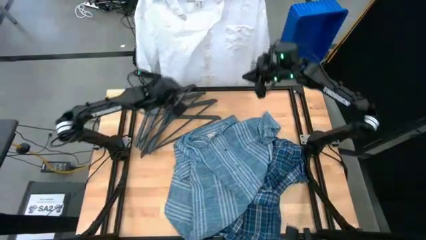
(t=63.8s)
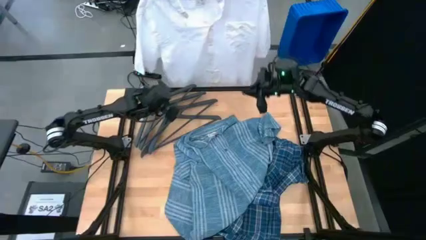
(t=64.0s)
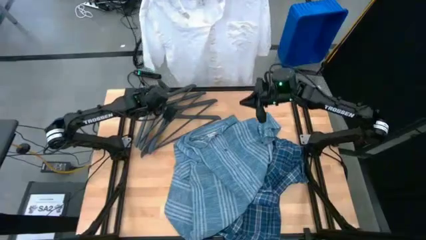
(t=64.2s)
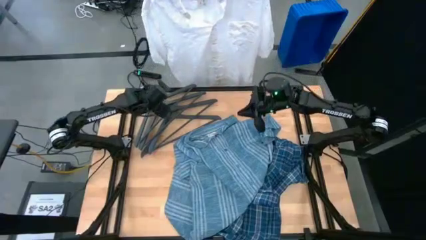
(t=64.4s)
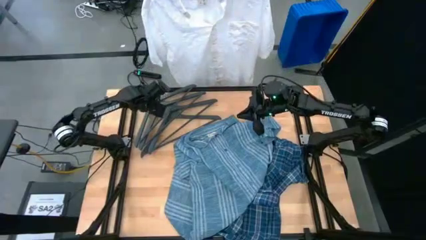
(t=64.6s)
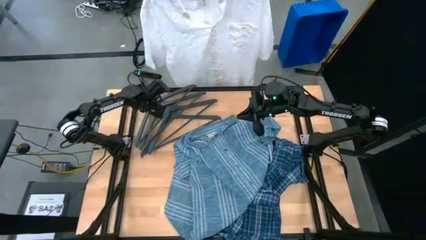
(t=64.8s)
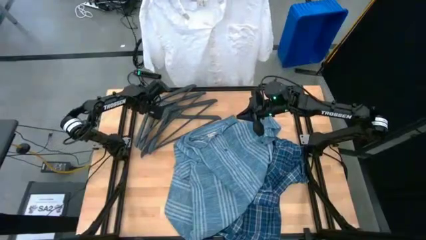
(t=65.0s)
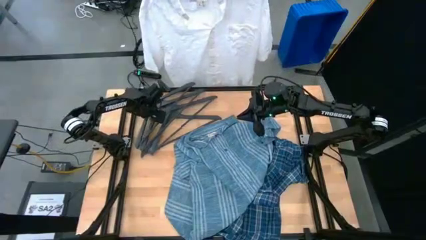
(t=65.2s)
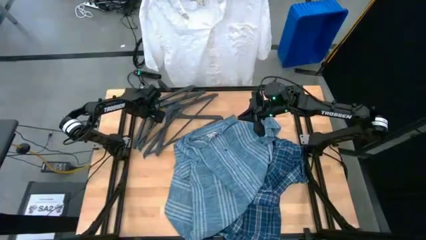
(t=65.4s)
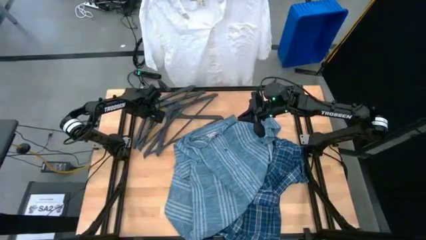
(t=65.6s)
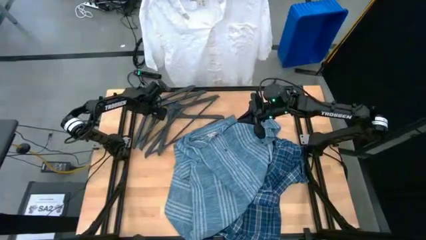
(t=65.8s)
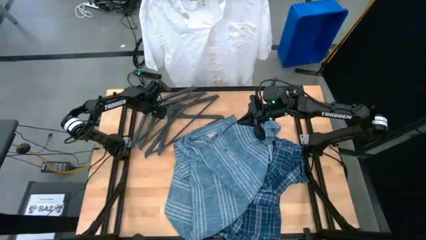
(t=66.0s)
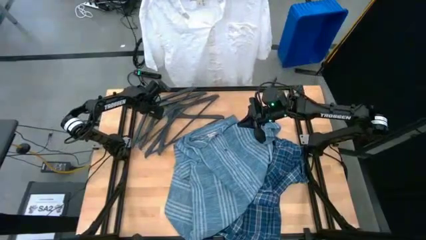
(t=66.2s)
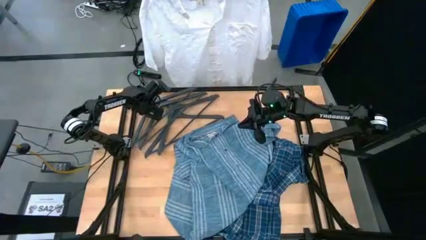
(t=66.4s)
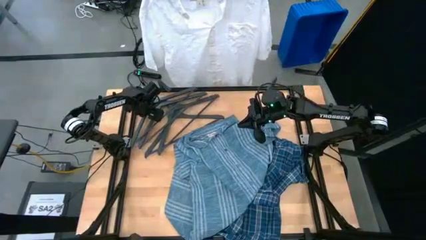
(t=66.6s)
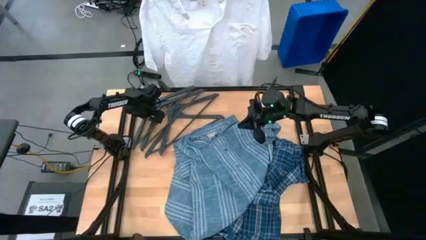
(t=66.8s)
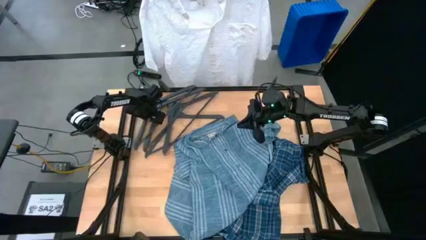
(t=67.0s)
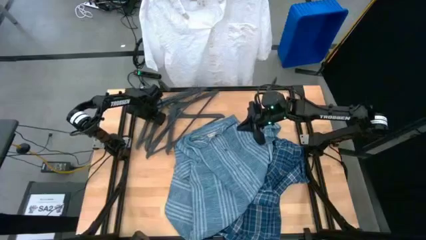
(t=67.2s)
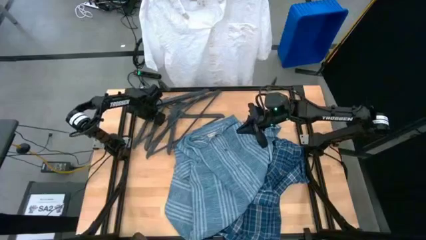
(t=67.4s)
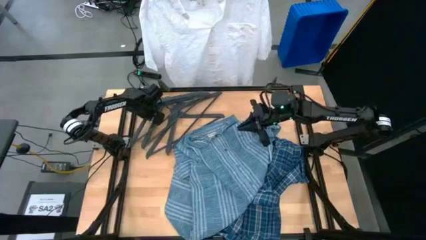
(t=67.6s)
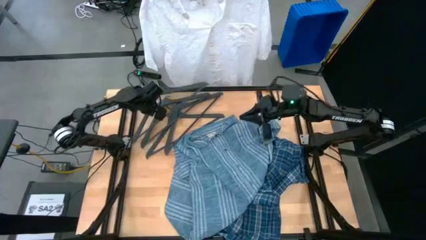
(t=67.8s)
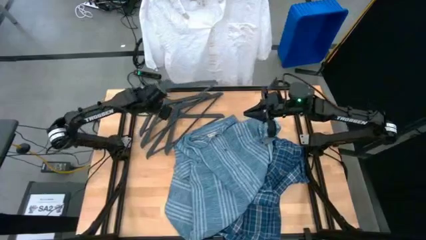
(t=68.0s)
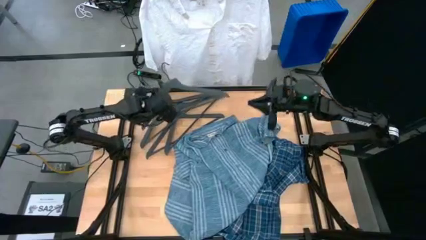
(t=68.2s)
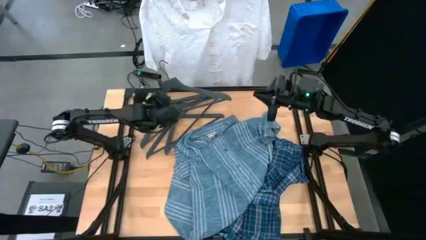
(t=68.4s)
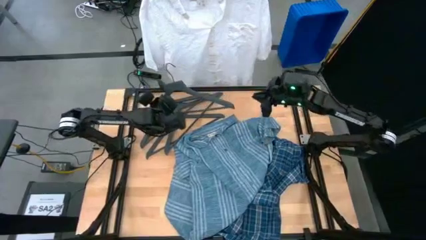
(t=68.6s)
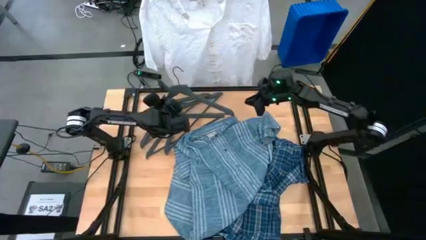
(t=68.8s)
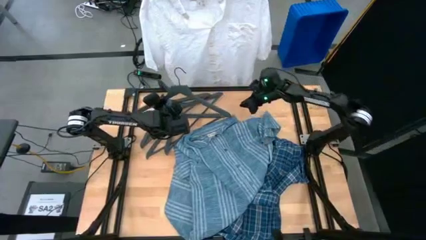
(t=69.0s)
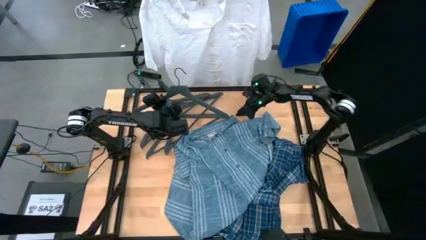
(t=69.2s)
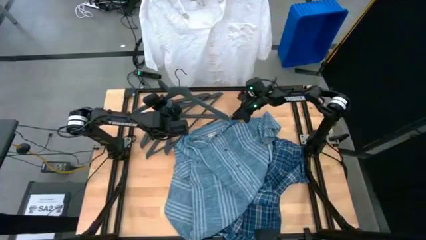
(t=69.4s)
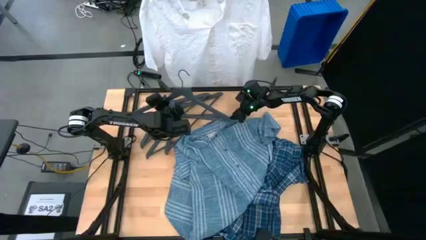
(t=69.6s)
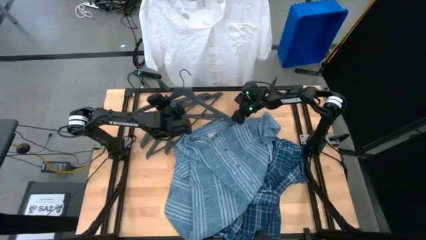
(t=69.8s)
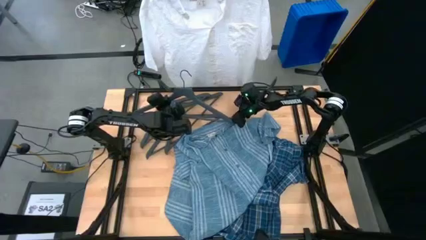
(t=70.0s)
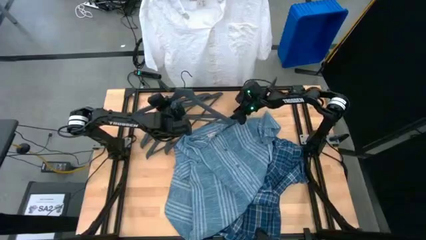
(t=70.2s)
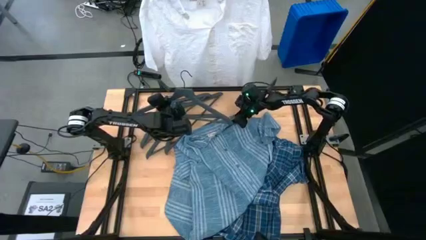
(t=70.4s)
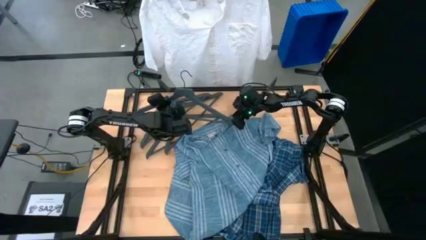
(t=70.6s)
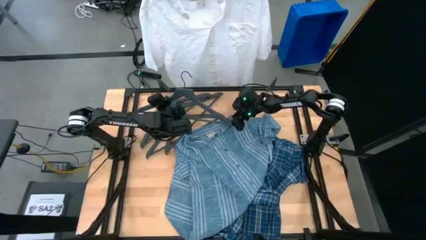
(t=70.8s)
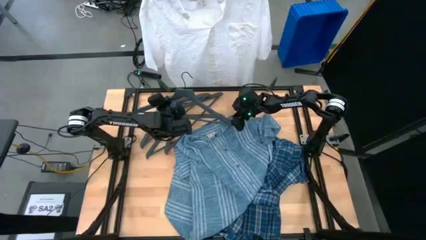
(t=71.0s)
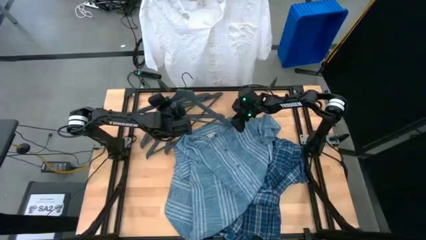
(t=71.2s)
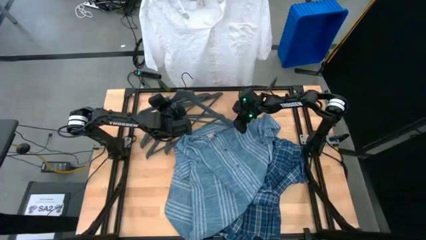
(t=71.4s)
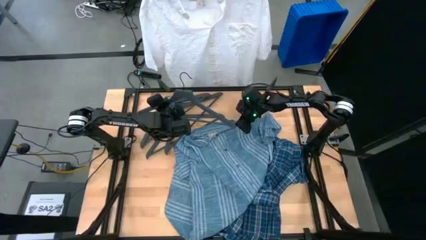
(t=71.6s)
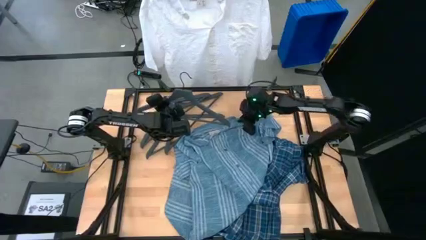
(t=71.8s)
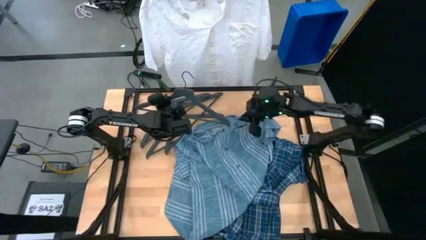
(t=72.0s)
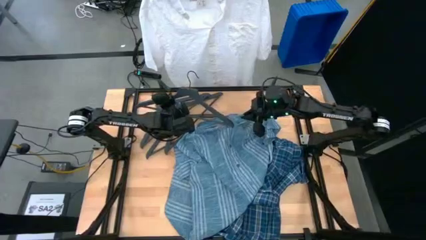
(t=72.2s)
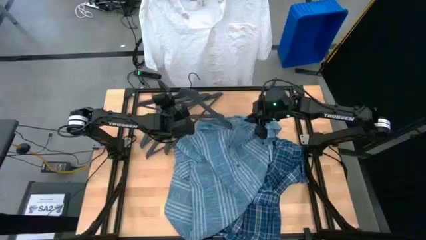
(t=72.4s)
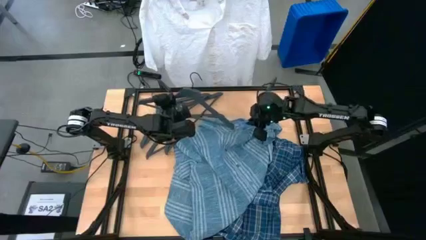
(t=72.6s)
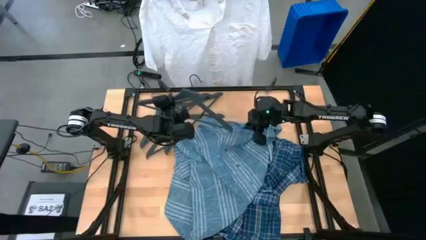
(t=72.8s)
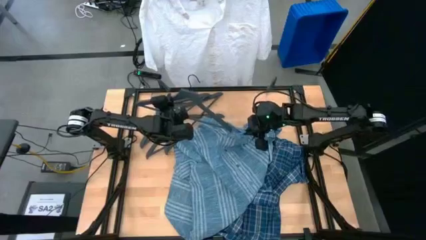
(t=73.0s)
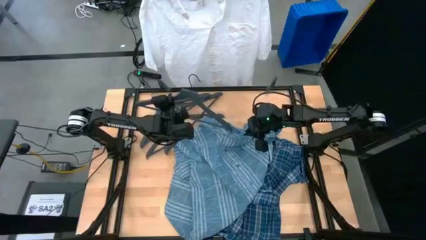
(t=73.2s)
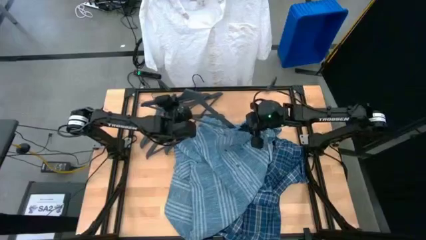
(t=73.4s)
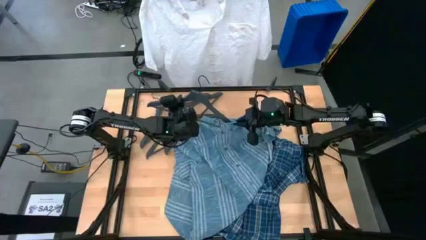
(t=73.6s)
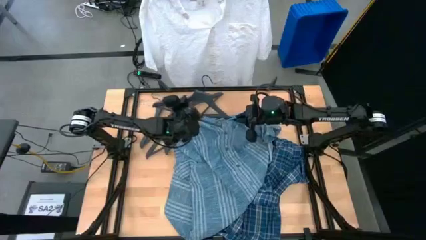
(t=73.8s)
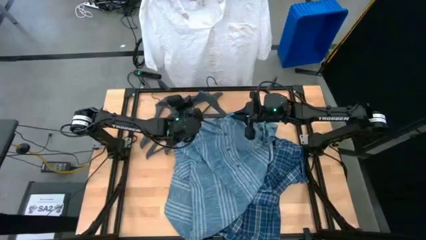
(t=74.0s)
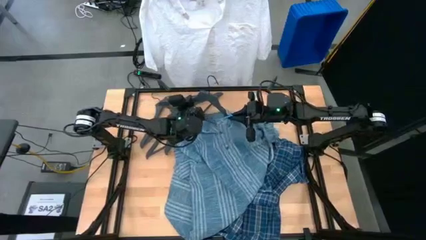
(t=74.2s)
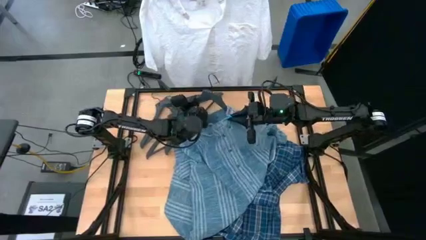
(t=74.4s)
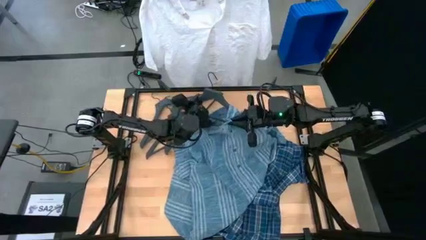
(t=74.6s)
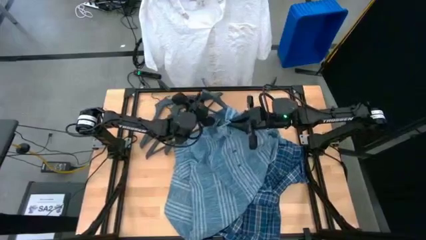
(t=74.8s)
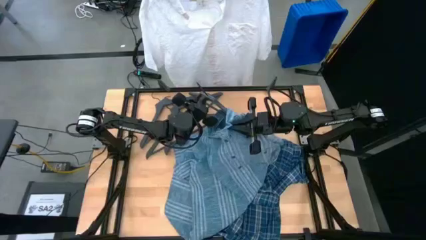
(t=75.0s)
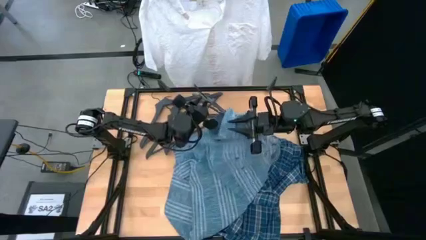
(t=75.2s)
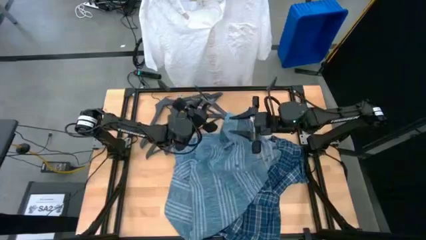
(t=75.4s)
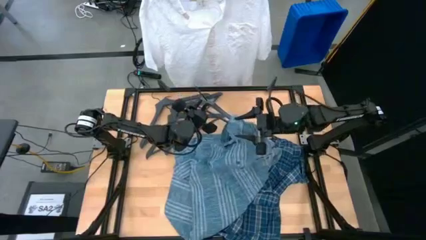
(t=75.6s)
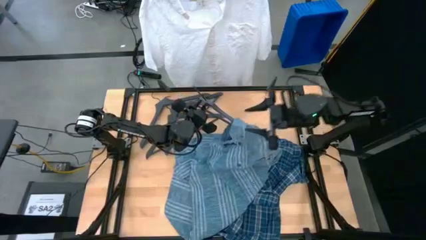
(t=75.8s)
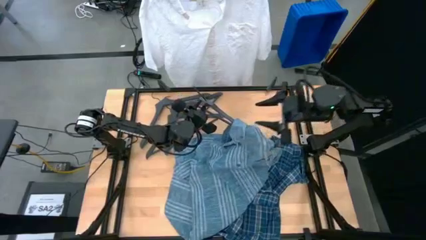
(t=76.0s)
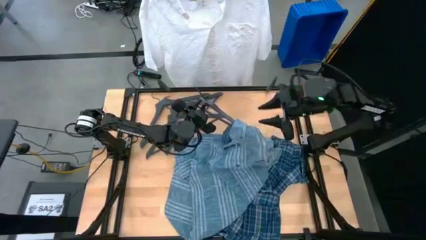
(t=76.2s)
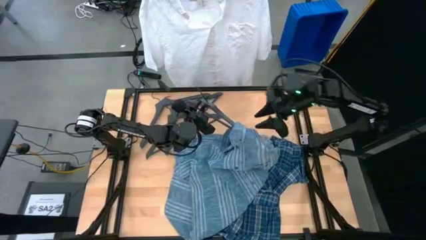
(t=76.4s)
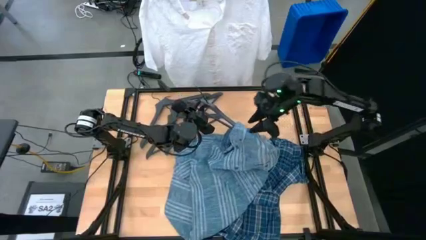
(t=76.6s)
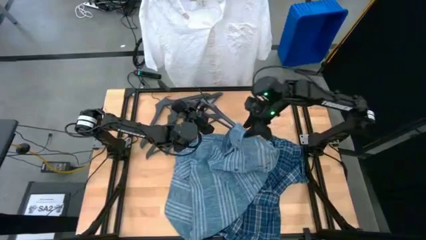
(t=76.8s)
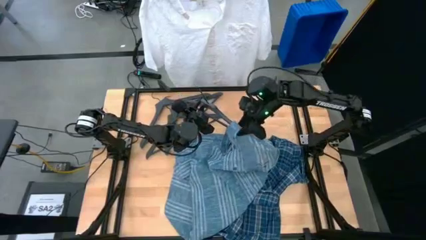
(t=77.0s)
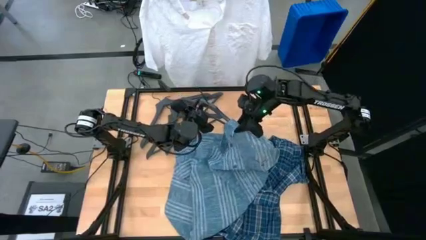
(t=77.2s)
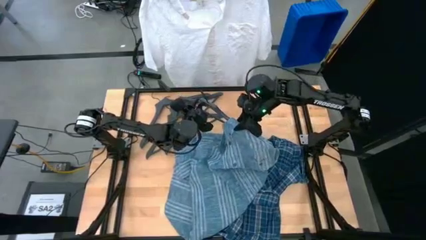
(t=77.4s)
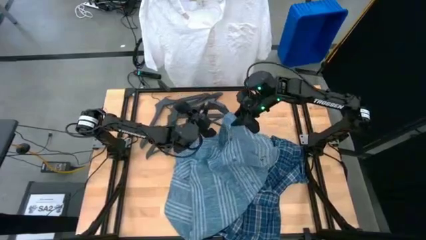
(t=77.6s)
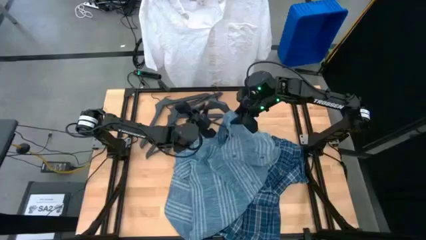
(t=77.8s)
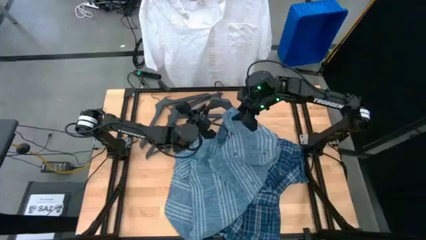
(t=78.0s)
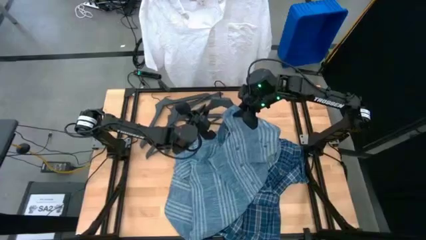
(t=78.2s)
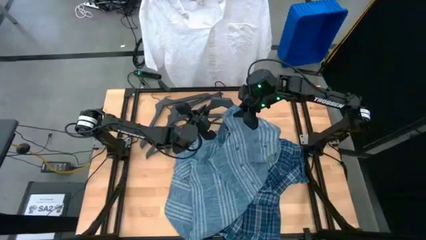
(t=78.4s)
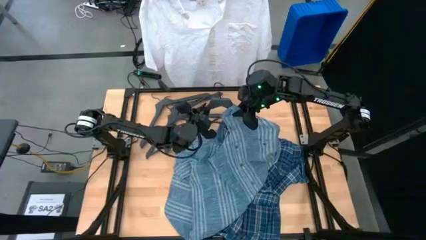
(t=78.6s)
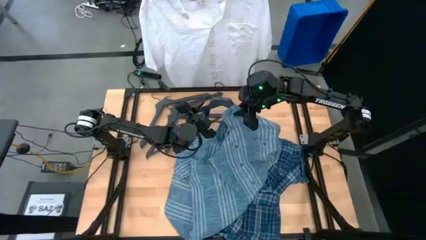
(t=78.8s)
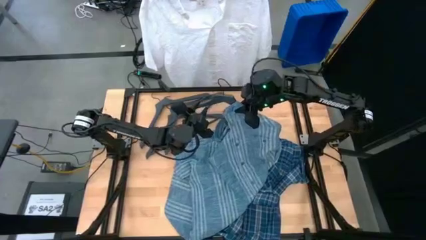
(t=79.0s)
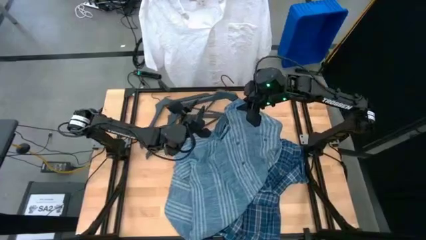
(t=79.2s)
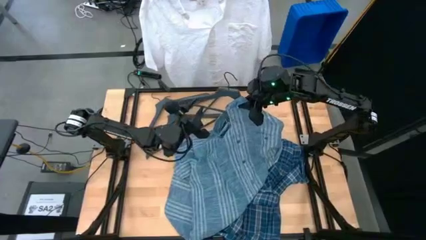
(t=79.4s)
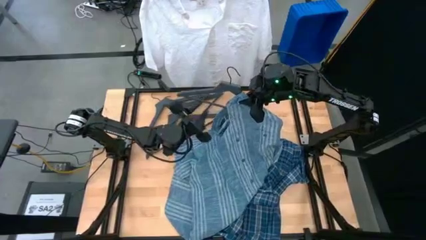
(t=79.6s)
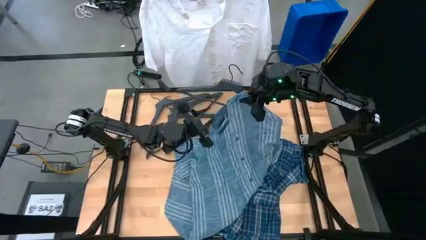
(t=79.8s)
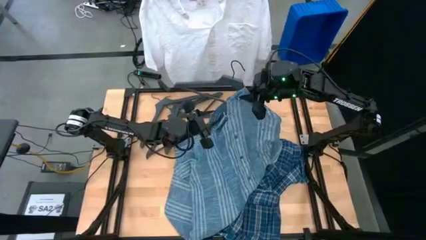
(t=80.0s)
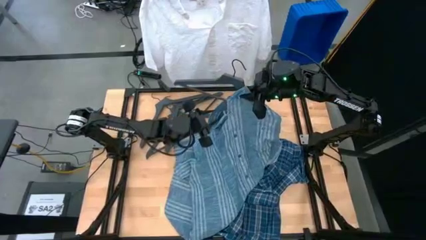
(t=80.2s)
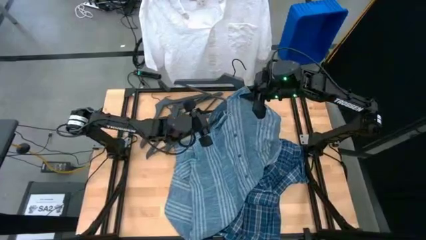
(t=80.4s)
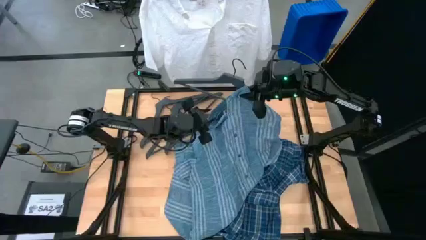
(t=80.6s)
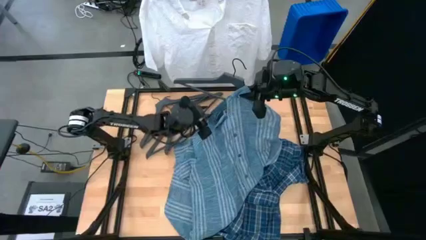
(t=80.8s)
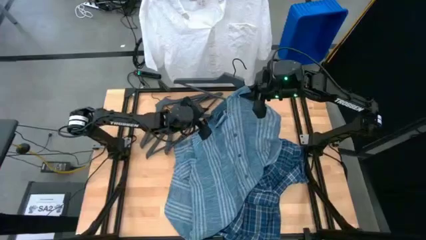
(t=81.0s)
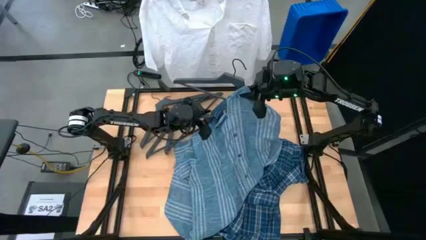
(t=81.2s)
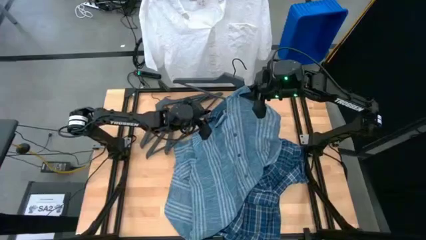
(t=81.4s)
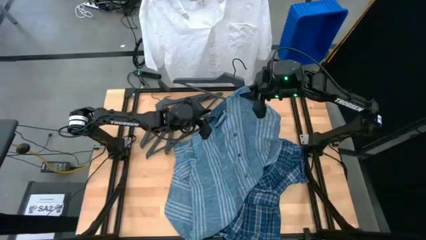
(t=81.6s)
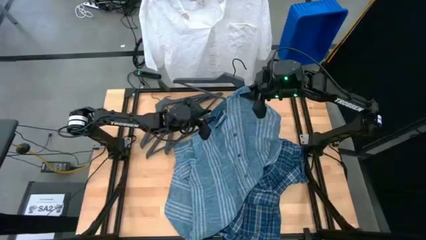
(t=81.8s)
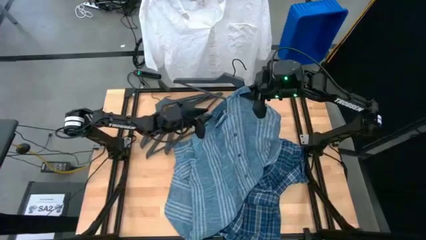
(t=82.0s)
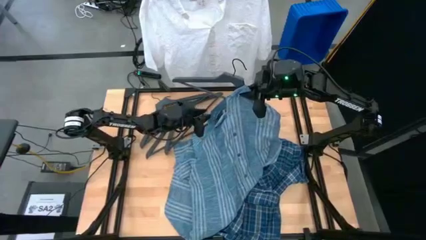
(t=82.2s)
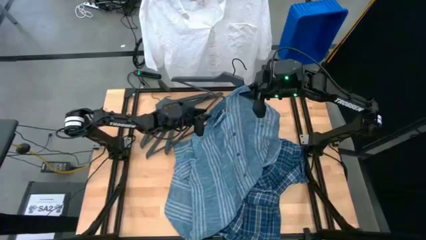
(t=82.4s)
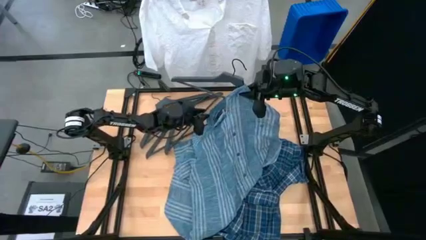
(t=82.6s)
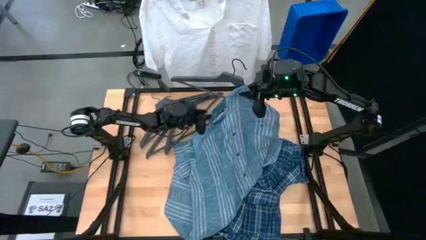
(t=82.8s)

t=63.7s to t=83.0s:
Task: Hang clothes
Insert the black hanger into the green shirt
